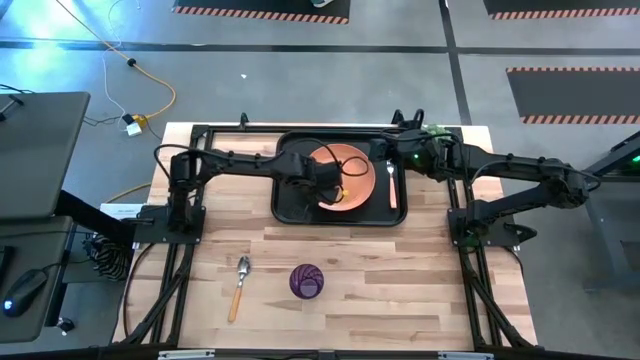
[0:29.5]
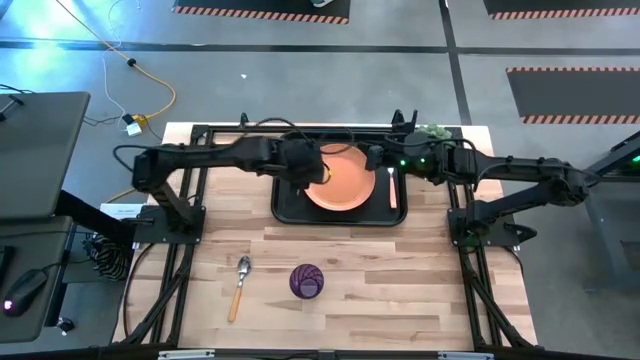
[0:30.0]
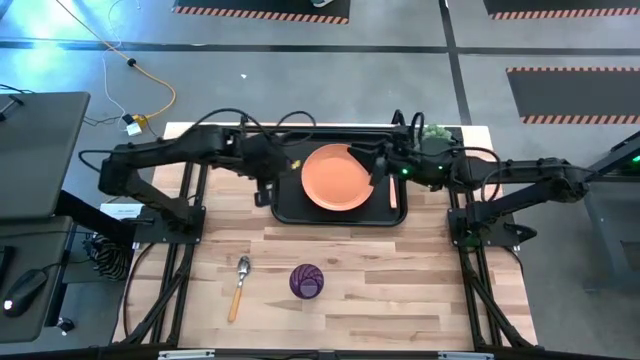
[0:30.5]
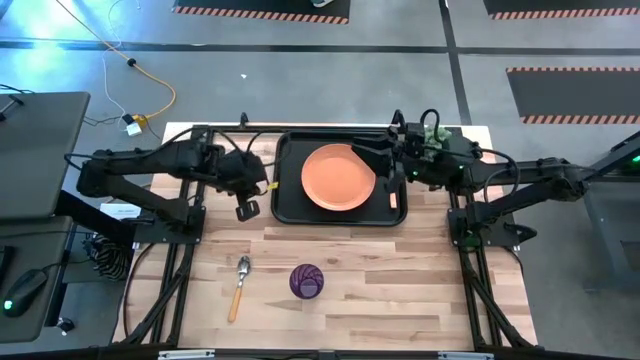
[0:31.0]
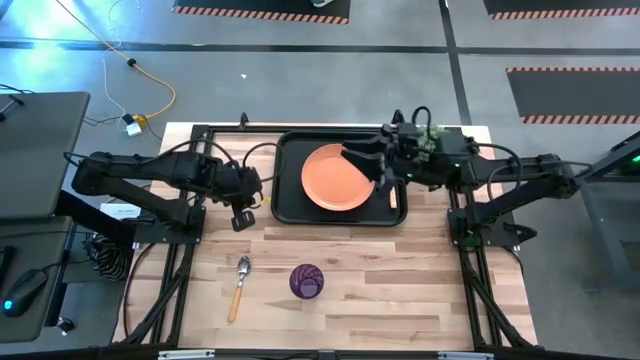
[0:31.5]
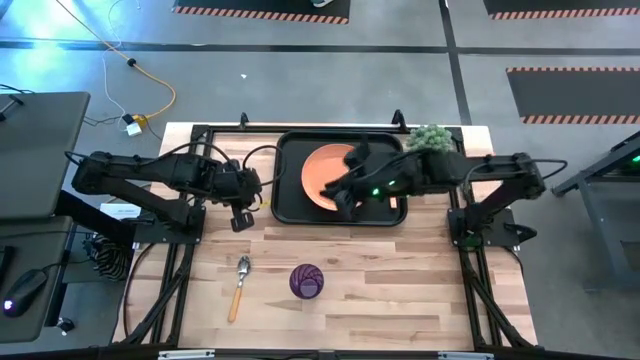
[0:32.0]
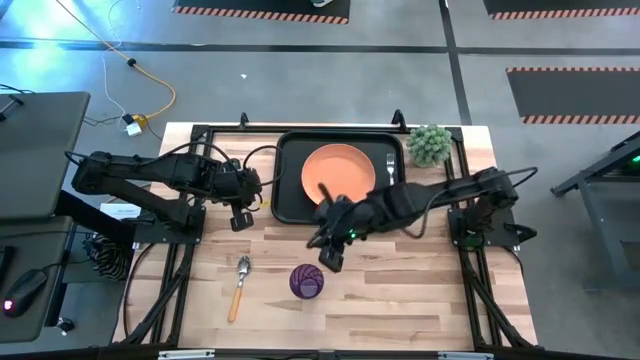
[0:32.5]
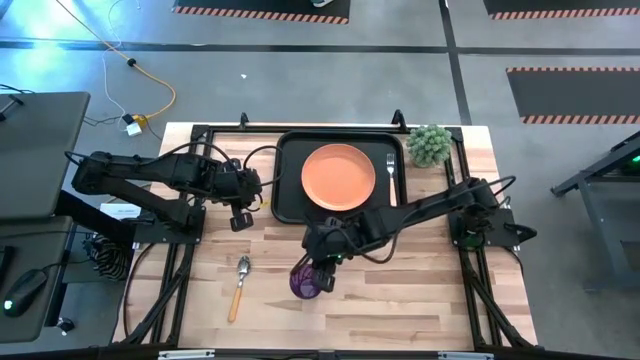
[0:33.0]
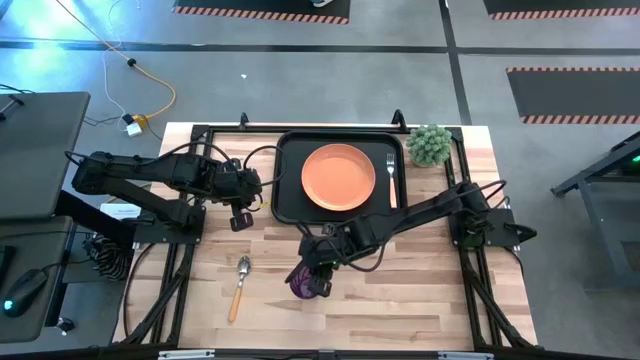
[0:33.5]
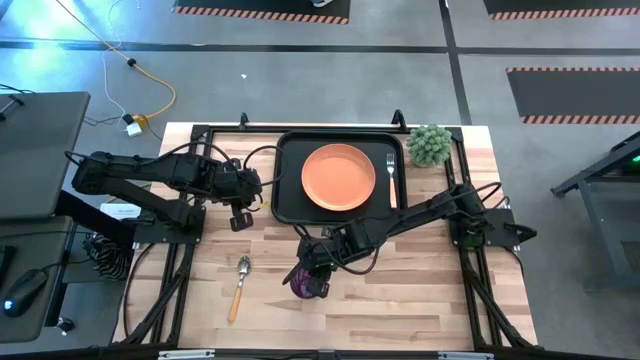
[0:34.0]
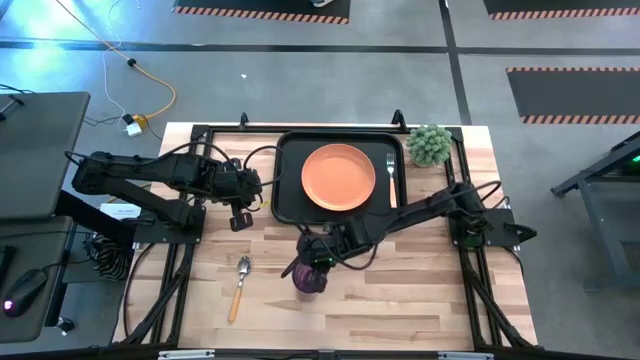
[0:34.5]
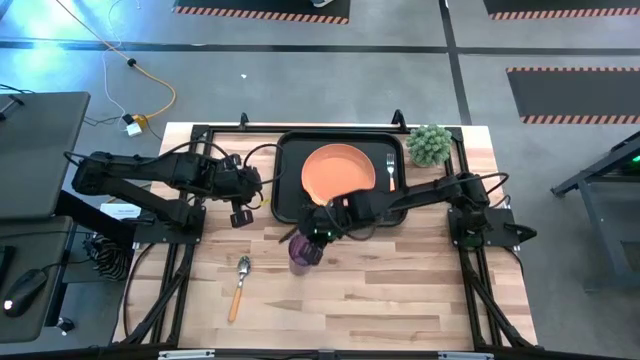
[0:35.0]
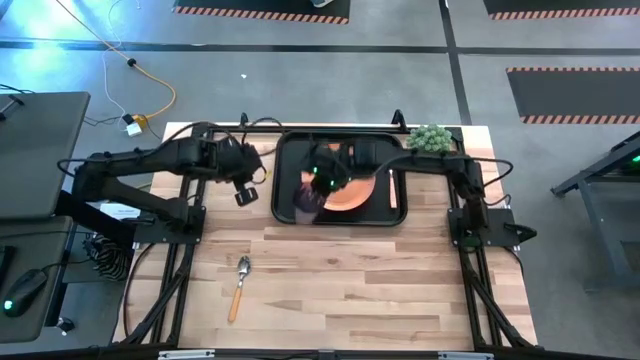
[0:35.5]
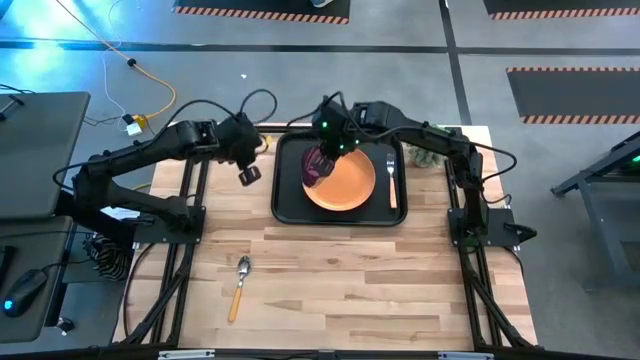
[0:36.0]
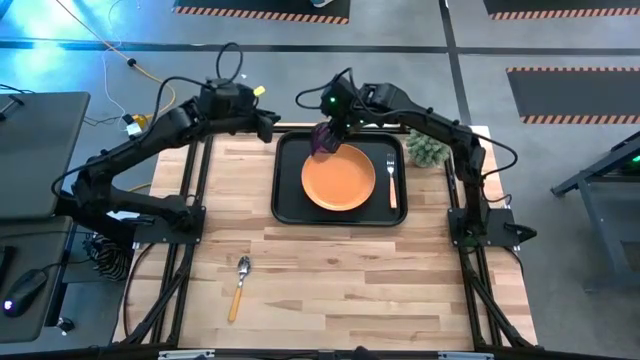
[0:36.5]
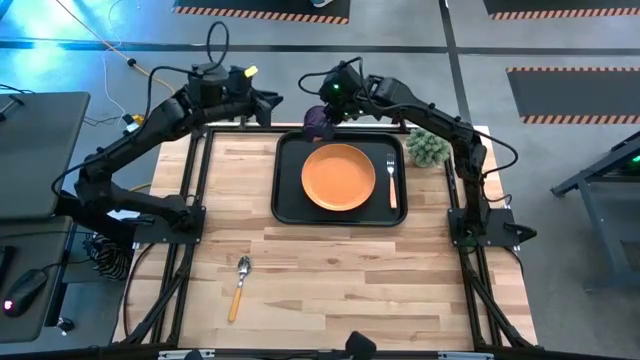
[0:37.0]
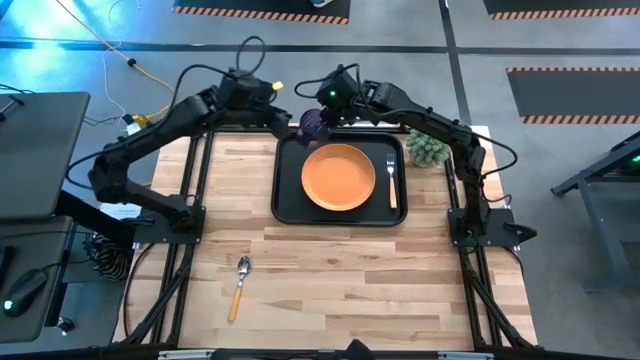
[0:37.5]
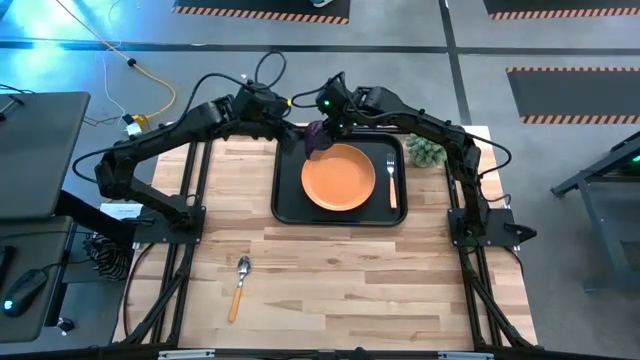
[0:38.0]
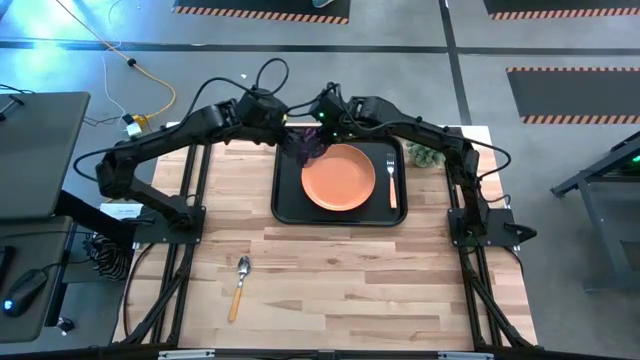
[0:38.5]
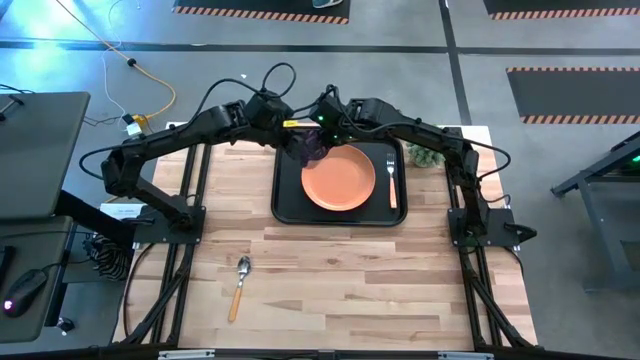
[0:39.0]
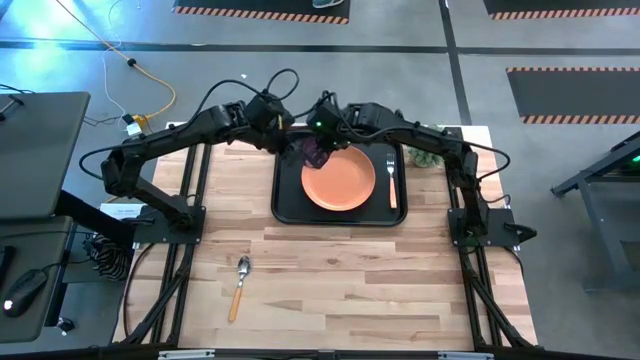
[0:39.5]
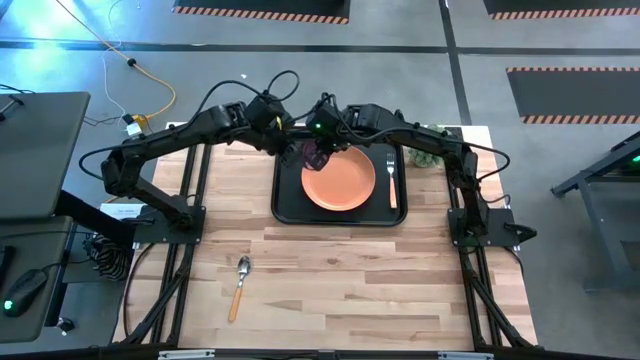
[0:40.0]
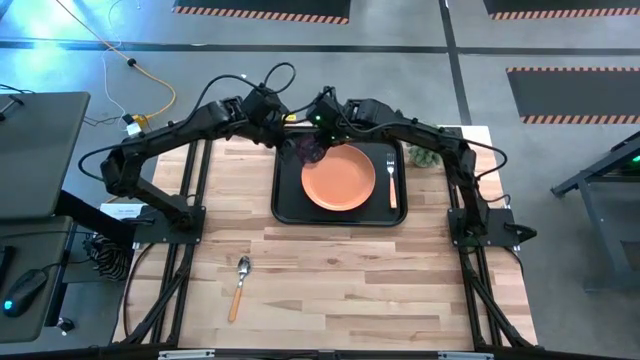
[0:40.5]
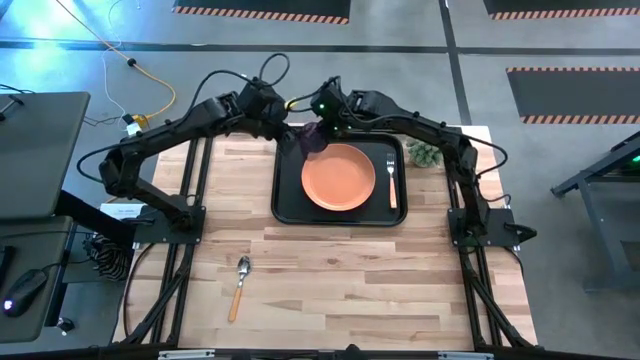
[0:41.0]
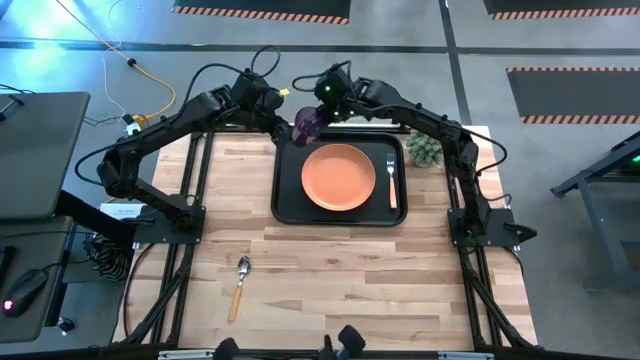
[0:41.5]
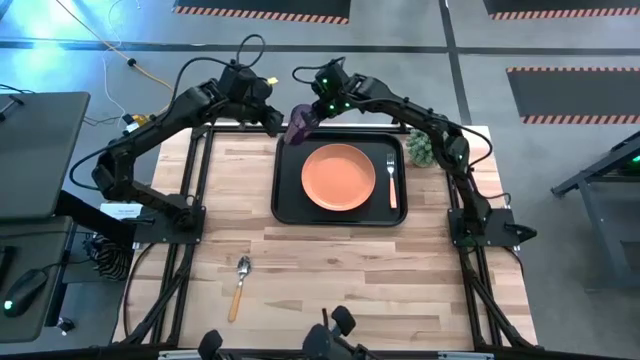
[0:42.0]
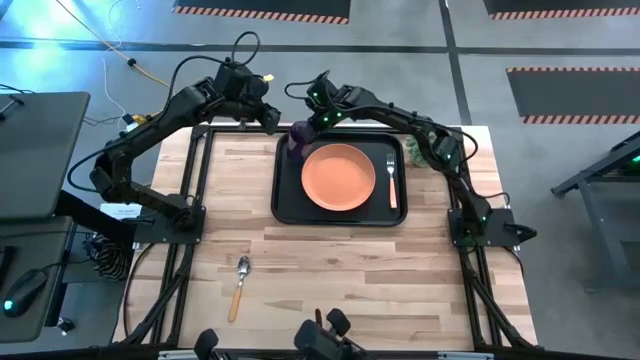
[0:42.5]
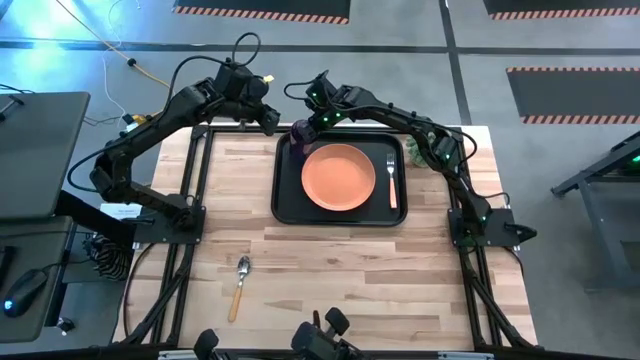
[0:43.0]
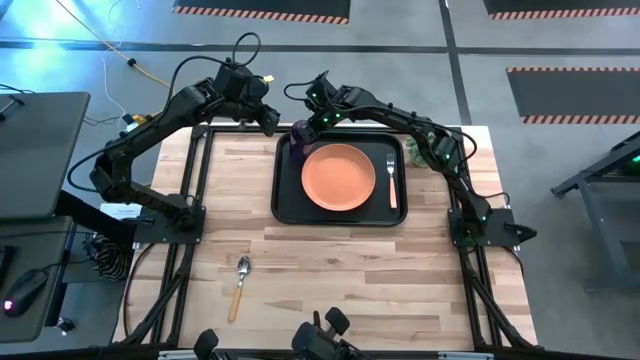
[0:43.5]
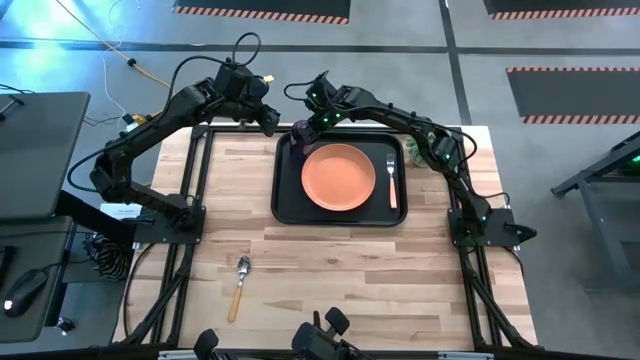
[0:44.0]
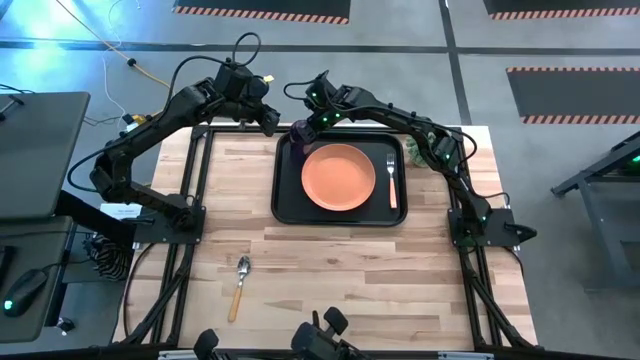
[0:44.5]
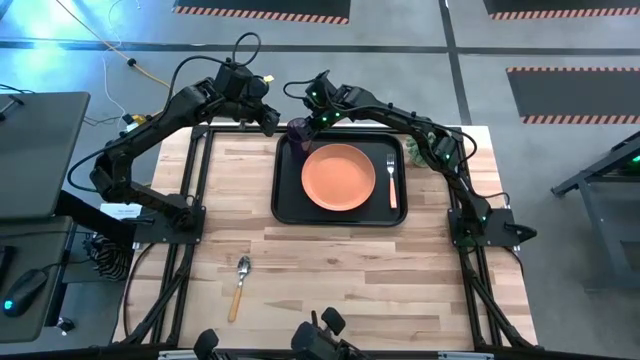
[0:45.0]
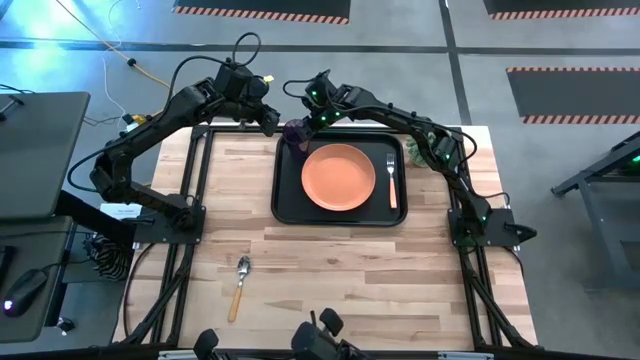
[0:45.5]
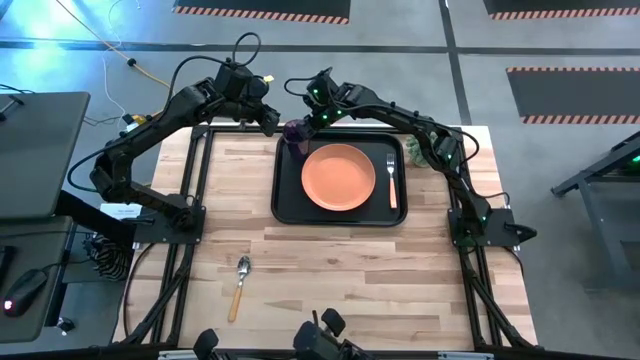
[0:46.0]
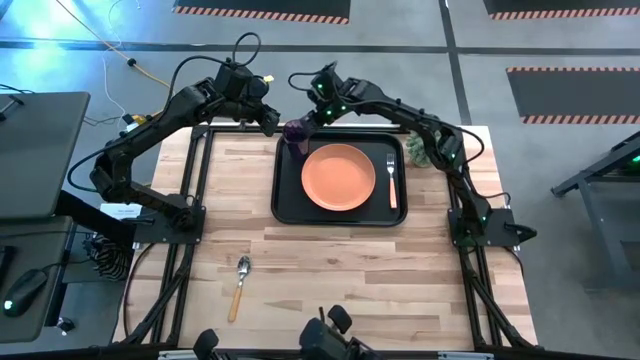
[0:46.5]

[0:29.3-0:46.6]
Task: Pick and place plate/cup/fork/spoon on tray
Put the violet cup on the black serving tray
